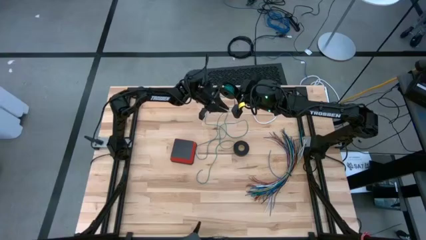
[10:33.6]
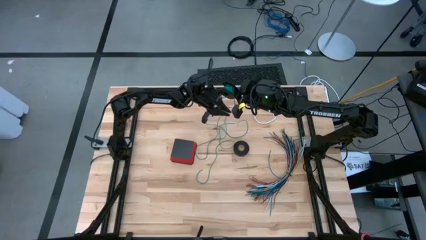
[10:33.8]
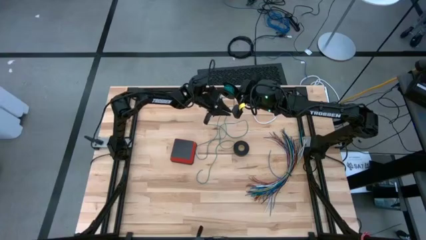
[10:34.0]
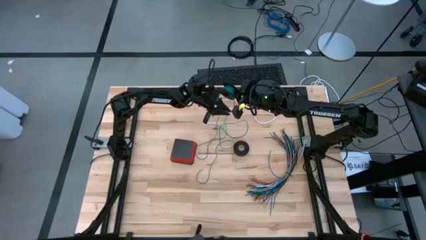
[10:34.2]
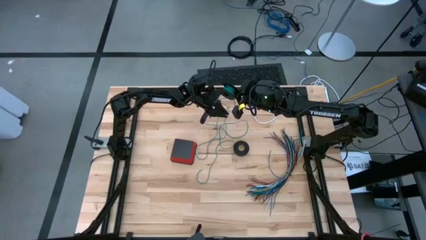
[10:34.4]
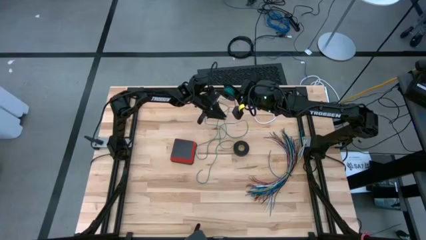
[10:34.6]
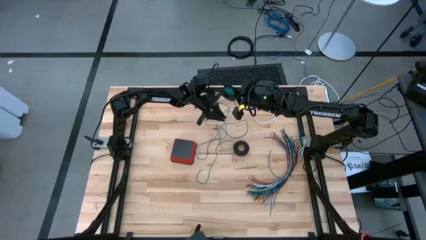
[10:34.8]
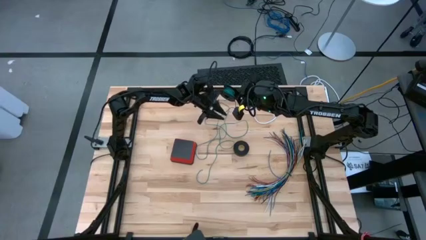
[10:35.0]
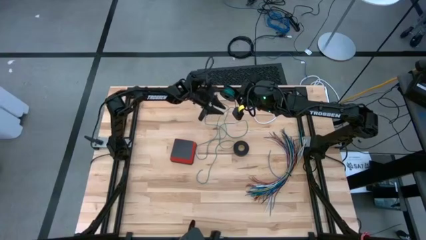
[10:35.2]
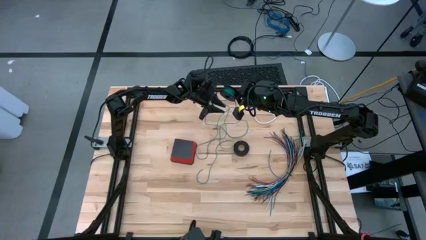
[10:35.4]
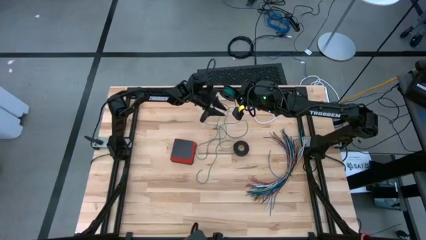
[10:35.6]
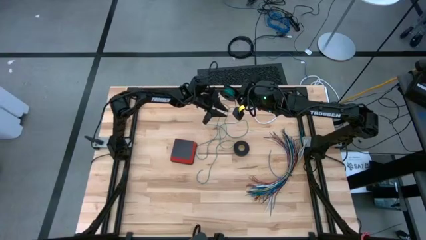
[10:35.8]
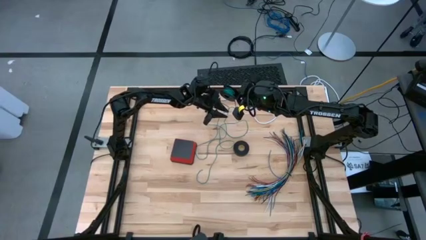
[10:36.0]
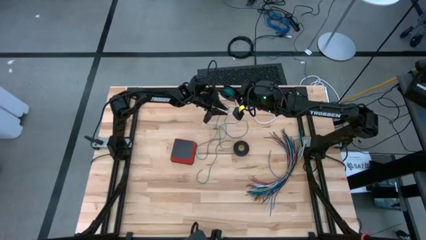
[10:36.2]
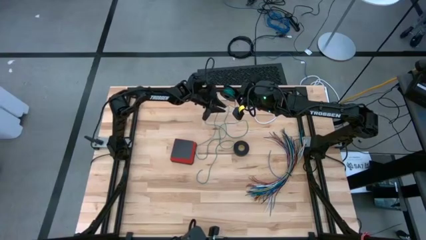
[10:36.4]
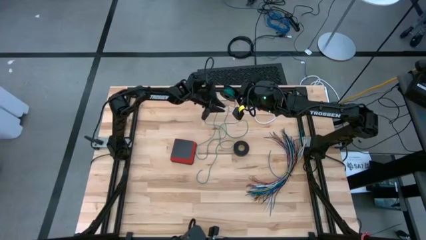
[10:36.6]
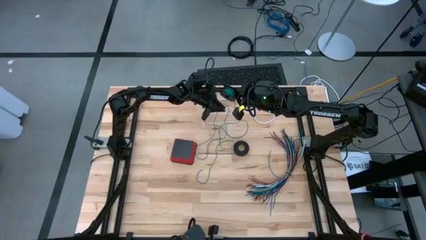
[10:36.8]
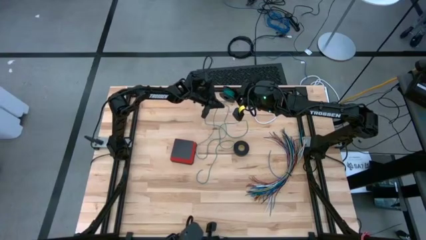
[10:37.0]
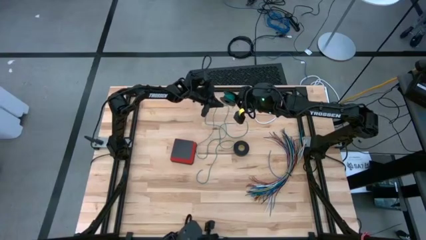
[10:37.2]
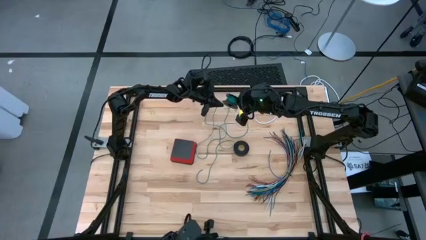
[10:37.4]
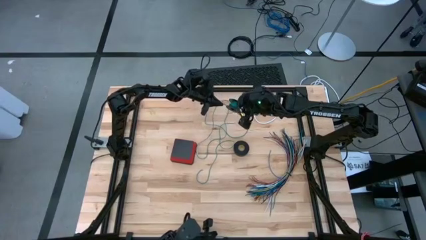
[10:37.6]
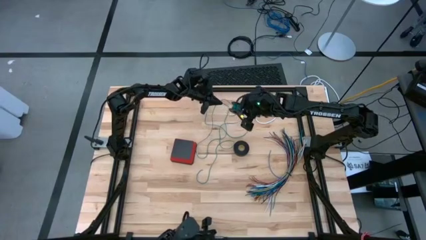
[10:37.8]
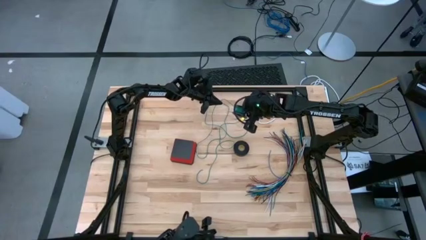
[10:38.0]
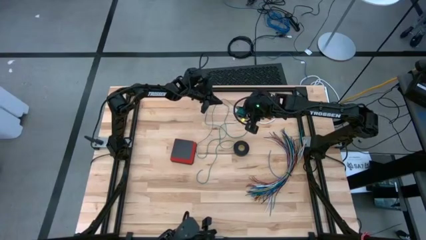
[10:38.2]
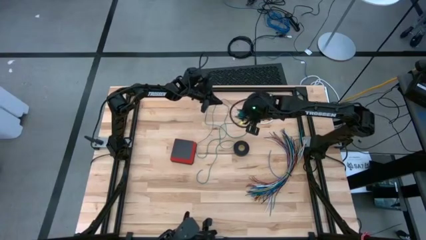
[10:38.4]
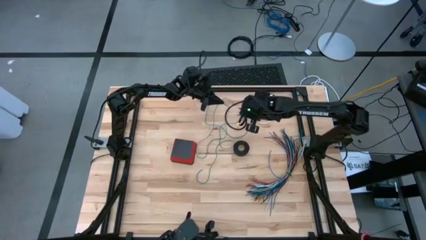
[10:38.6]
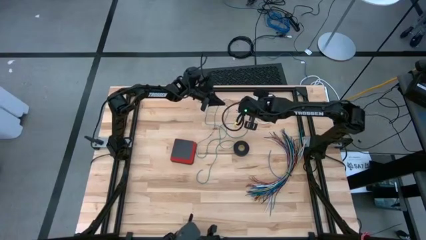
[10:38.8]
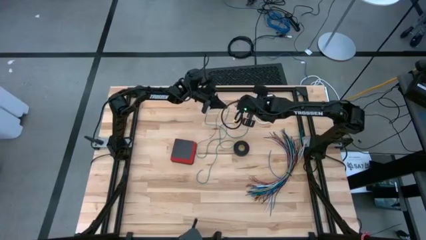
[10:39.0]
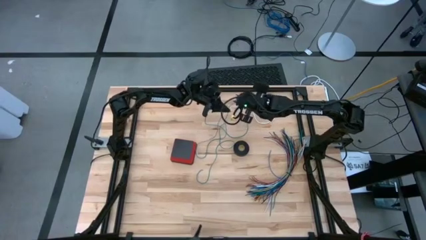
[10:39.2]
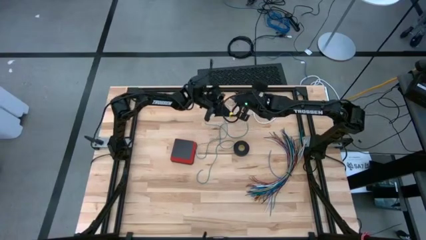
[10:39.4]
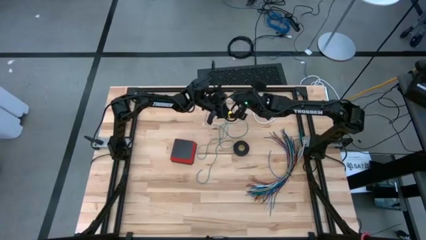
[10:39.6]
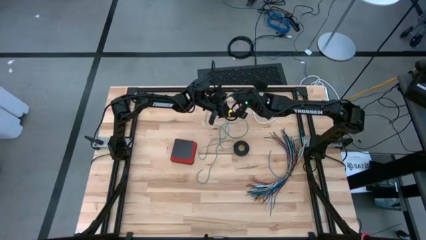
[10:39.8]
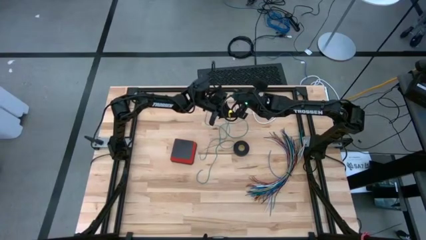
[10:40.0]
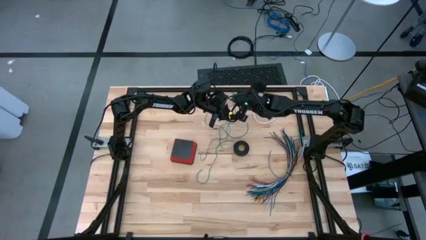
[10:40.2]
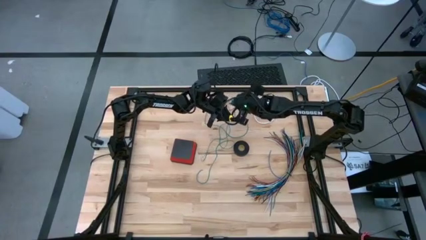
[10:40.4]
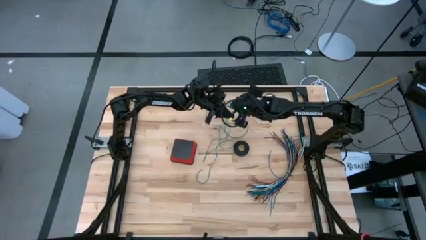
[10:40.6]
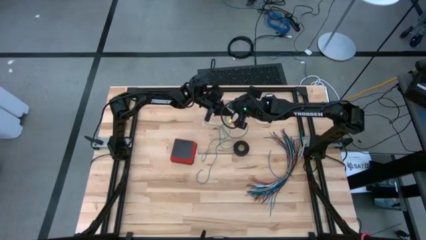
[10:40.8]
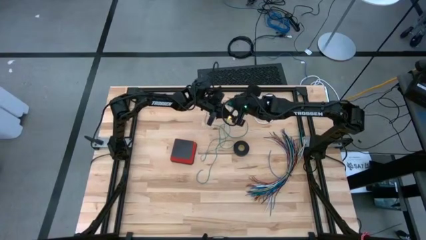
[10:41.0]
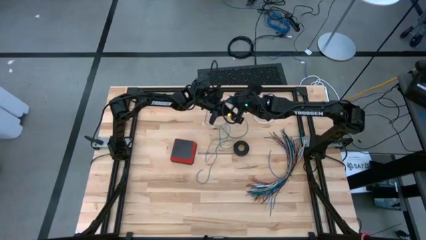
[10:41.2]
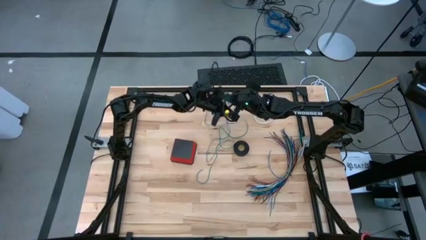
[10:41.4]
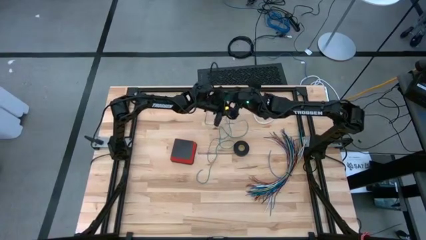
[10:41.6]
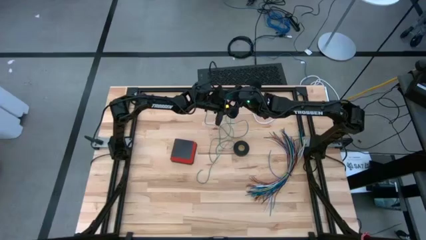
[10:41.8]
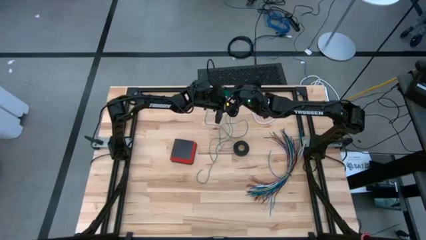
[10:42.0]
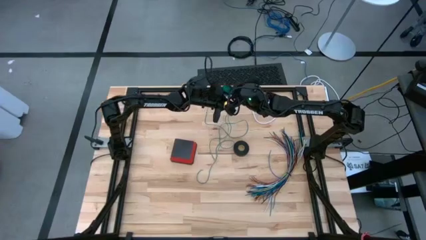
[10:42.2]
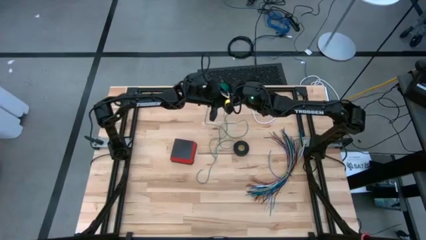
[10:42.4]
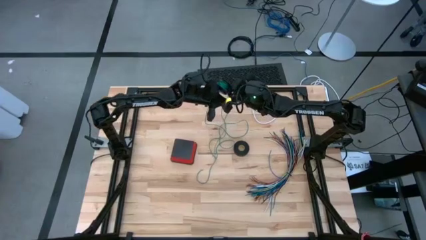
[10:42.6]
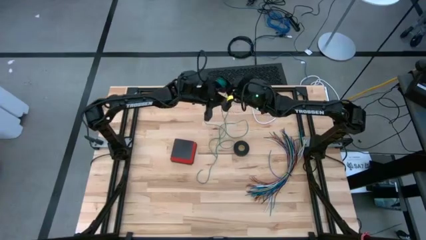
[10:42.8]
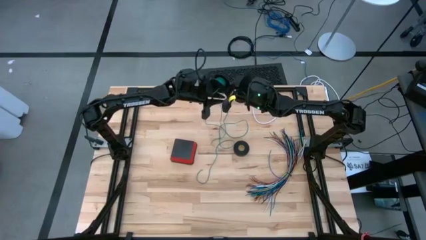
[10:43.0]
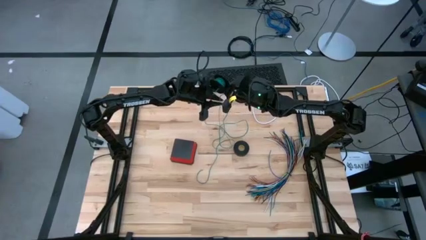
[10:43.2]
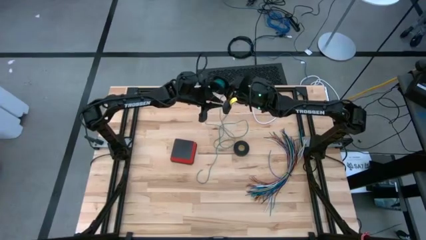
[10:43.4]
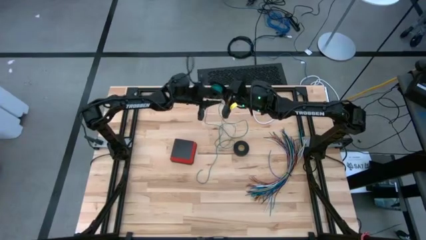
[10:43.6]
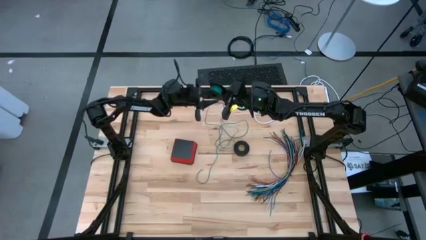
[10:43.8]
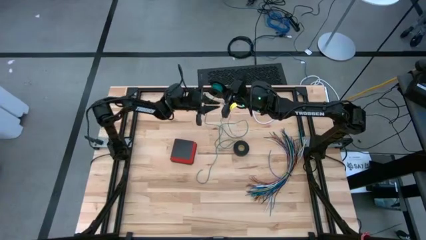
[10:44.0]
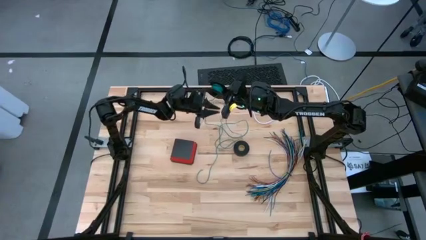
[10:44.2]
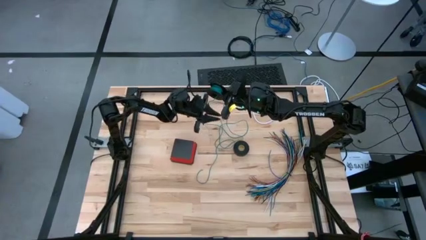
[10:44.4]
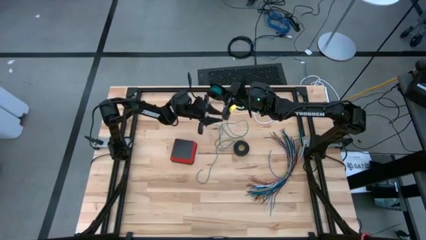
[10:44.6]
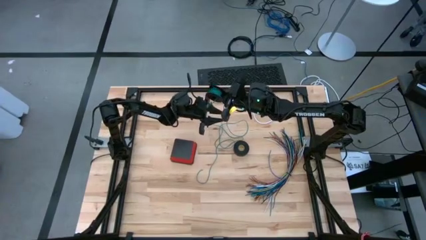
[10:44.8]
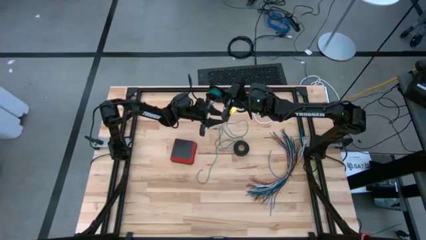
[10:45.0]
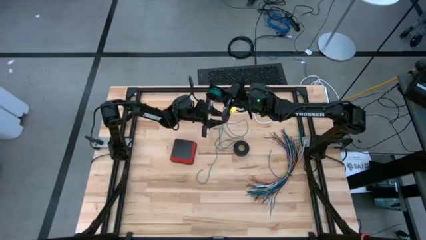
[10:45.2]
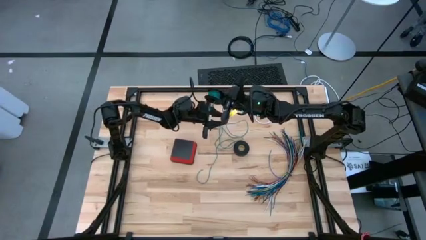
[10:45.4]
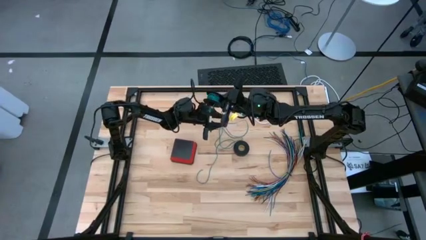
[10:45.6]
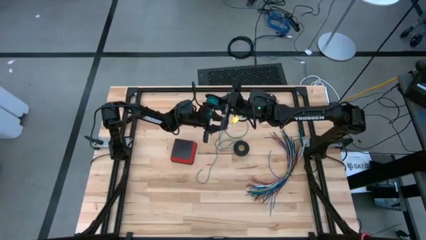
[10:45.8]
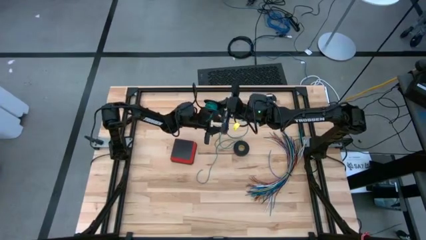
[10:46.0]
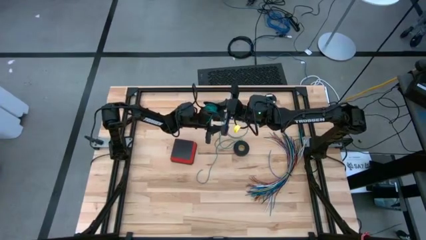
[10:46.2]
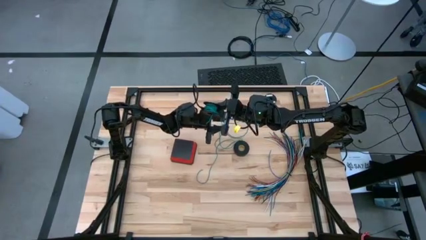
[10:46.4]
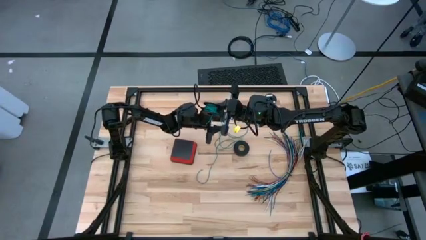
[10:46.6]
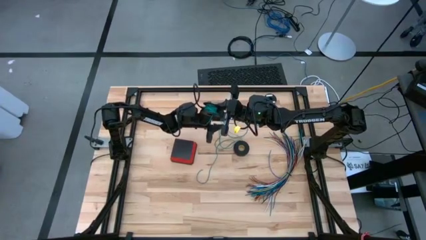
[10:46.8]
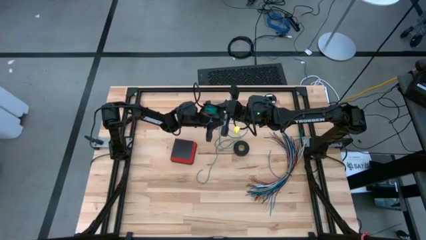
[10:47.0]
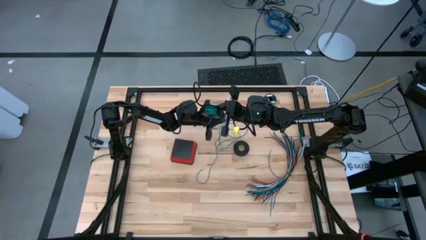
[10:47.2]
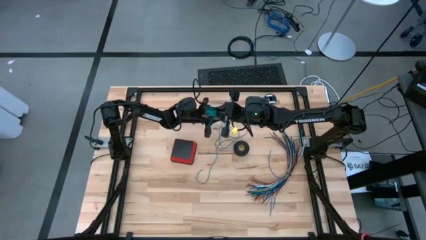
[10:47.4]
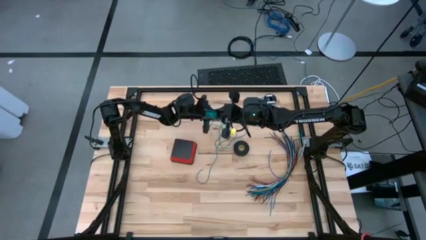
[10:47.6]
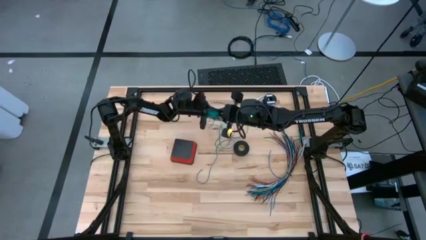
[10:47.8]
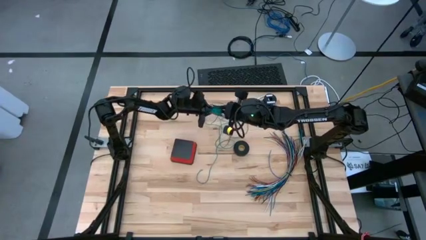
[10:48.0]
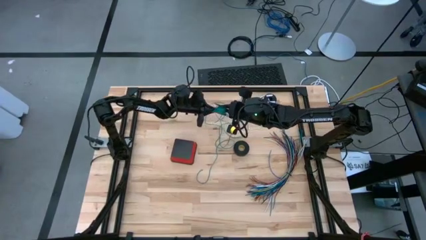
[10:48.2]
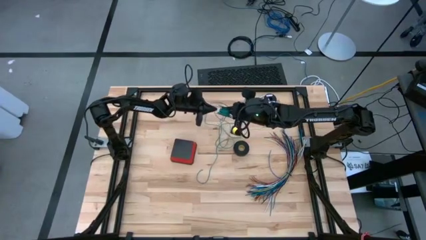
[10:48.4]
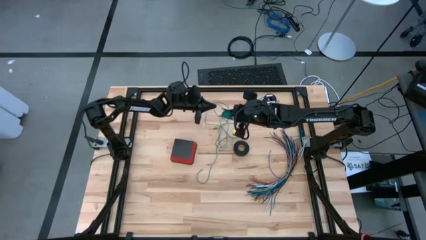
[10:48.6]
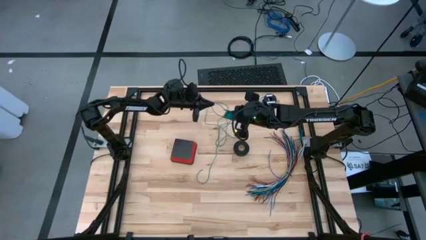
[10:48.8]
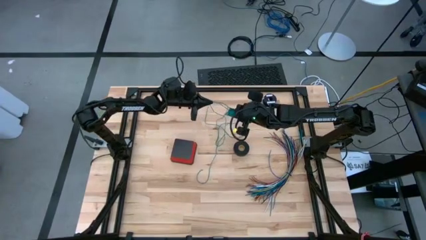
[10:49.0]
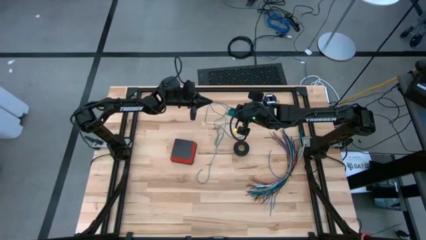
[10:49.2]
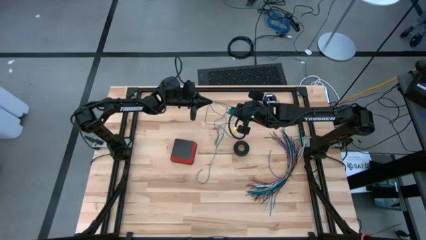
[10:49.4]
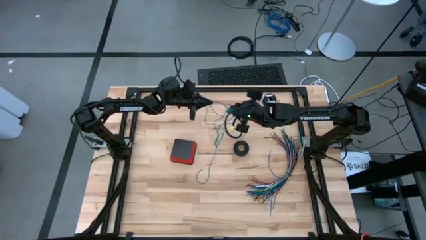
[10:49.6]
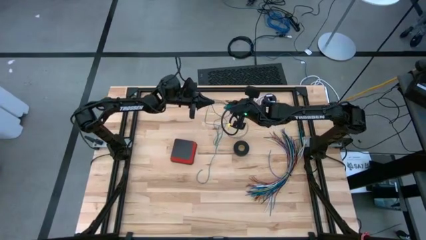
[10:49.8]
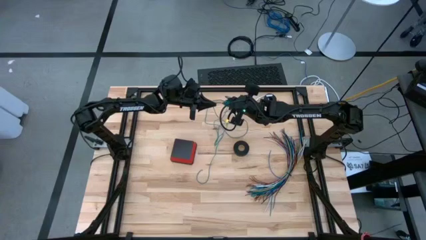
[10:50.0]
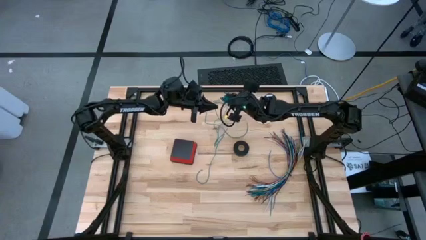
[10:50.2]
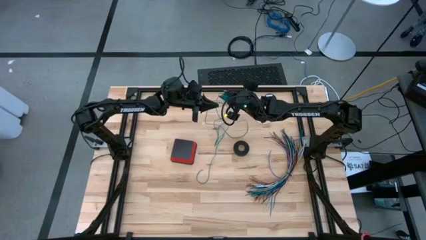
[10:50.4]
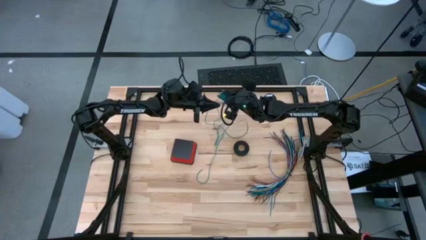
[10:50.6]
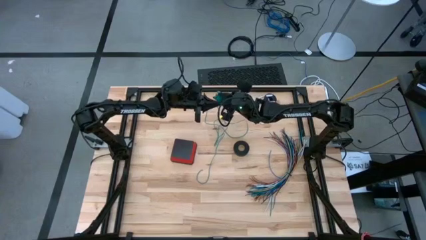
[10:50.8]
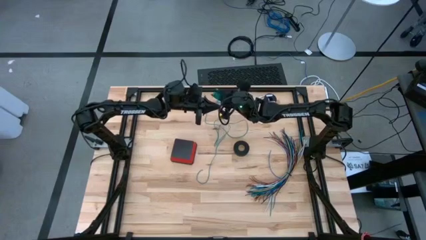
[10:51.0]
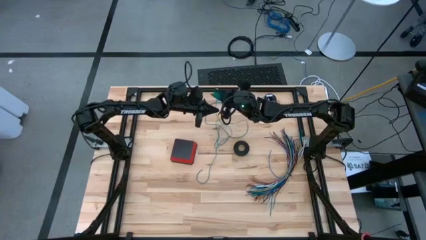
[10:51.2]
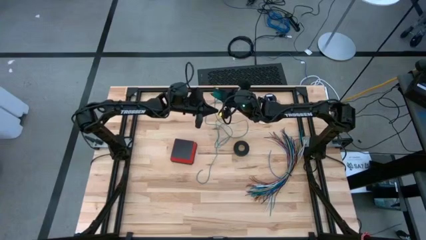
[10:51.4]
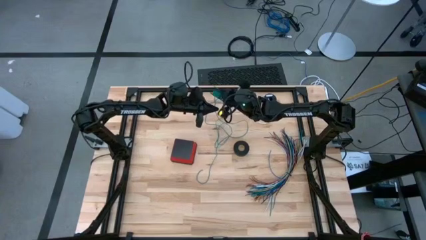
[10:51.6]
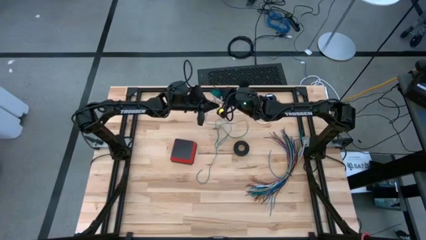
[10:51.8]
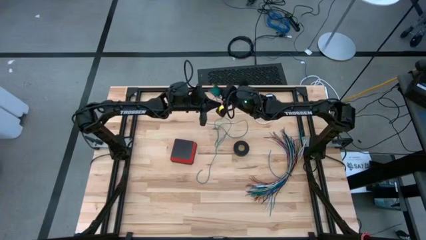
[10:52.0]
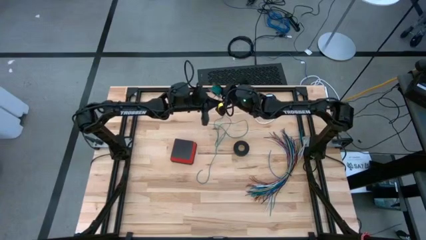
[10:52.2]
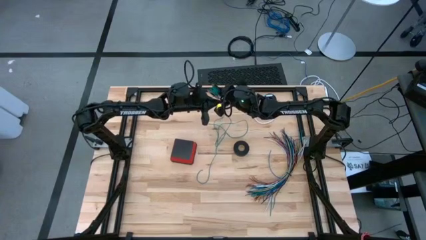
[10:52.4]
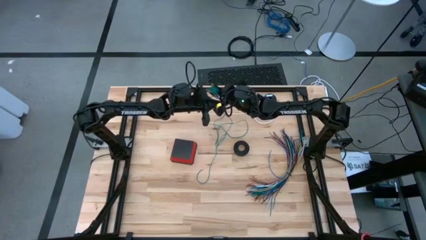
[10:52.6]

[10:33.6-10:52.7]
Task: Coiling cords
Coil the green wire cable on the spool
